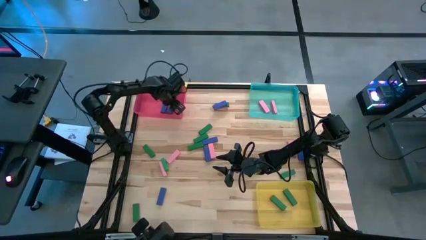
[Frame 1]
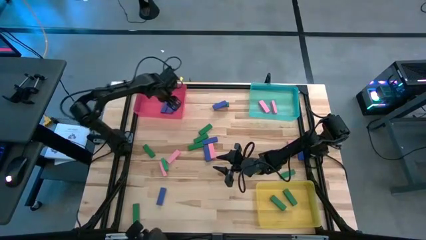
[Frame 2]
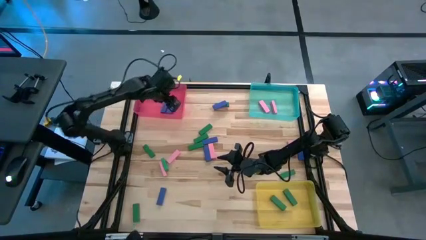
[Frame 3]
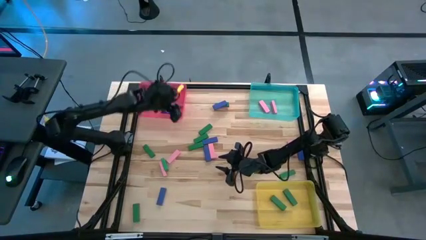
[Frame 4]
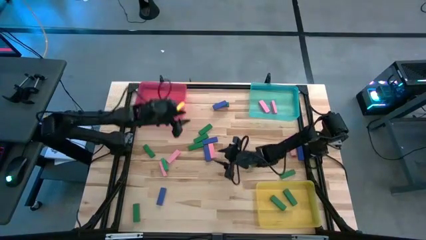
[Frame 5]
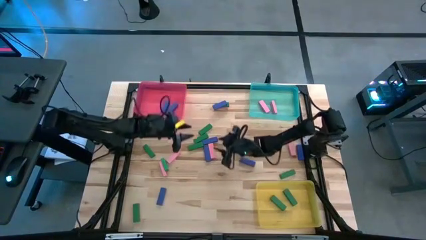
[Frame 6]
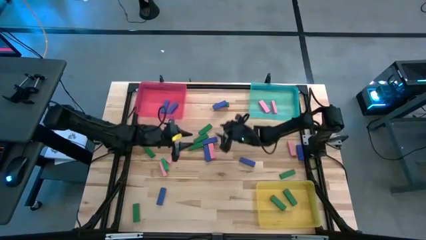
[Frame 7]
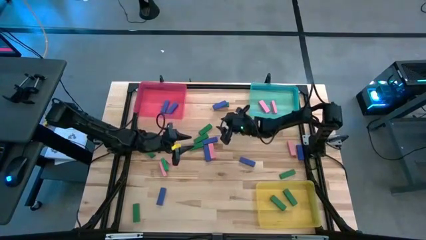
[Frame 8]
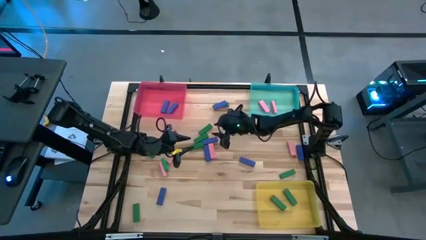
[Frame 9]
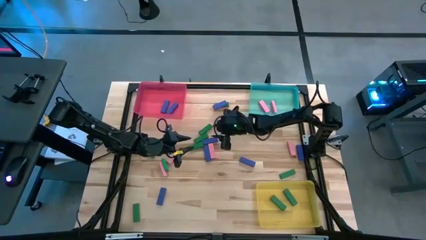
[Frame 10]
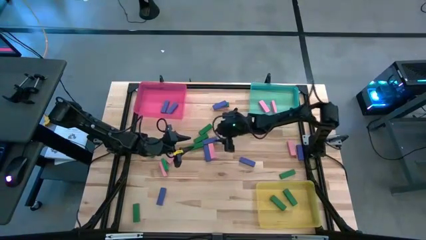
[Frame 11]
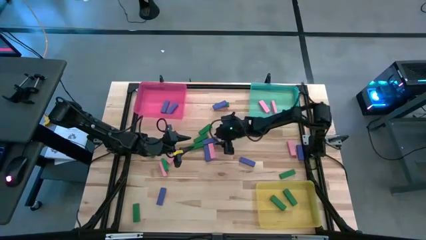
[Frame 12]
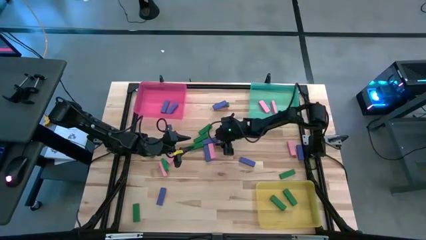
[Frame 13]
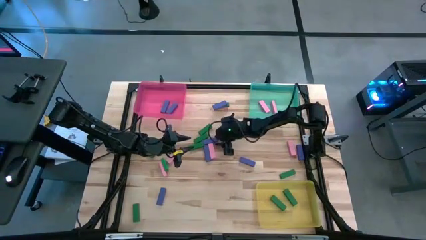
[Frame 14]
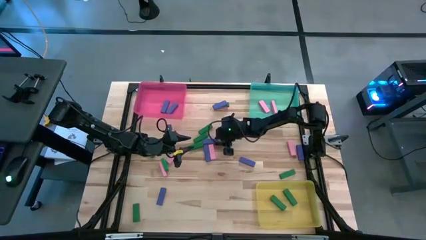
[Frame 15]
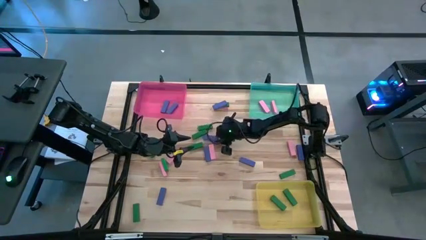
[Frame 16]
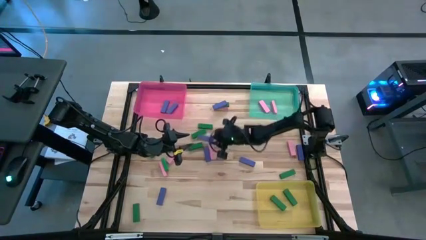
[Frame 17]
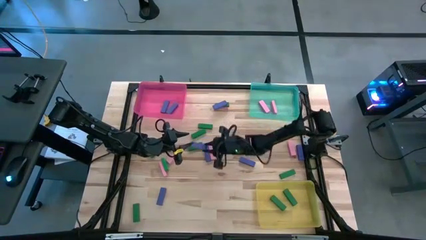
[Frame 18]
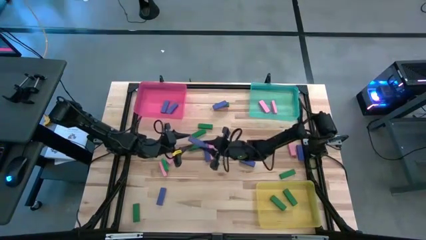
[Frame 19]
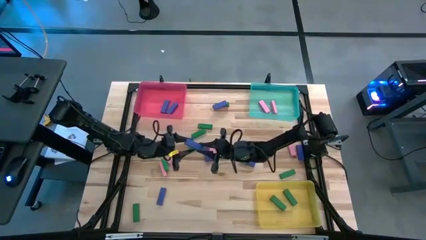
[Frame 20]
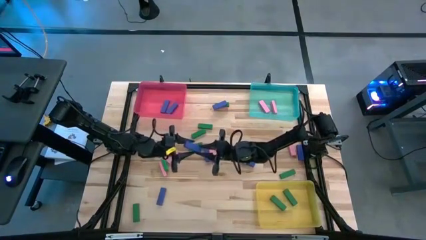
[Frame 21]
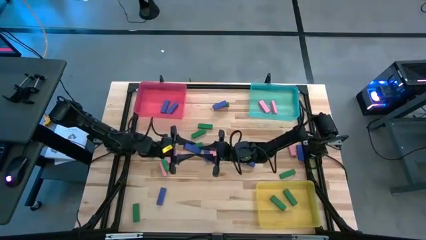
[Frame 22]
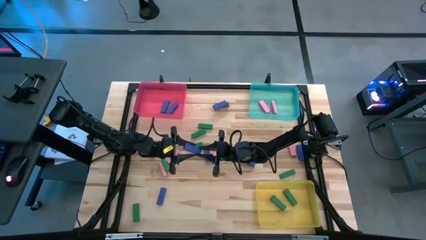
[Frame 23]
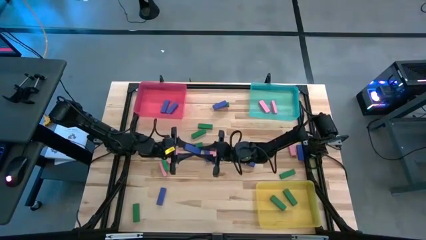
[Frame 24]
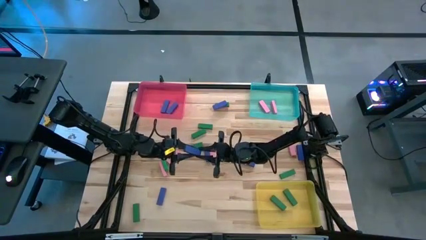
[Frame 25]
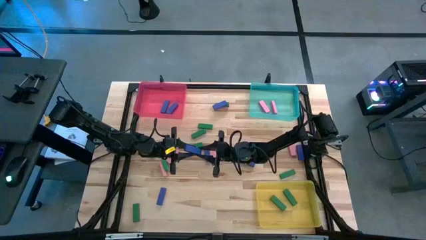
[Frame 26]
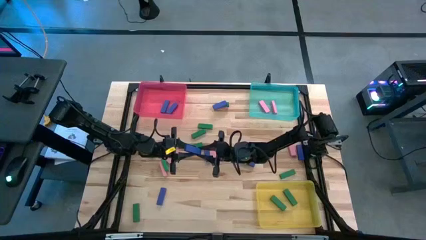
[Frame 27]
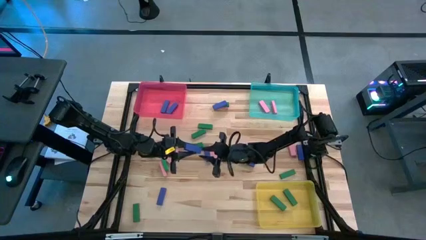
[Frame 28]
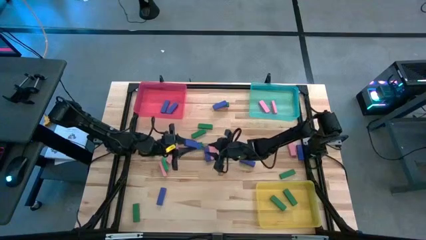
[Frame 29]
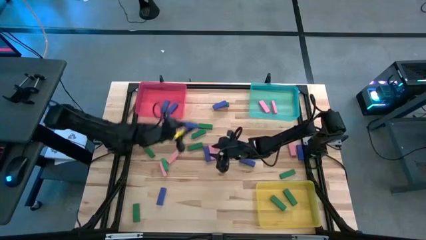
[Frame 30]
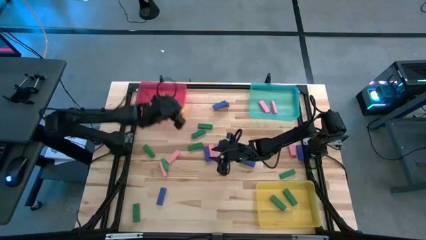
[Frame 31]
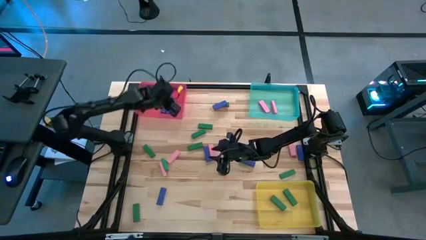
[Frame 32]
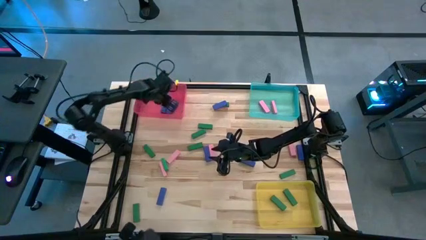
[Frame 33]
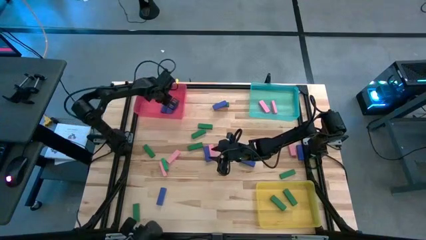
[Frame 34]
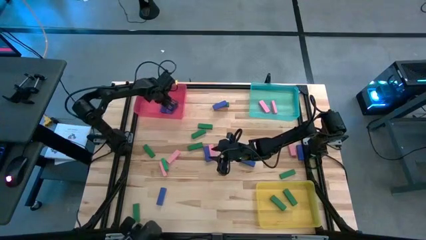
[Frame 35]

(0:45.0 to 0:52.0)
Task: Sort blocks
Put the blue block into the red bin

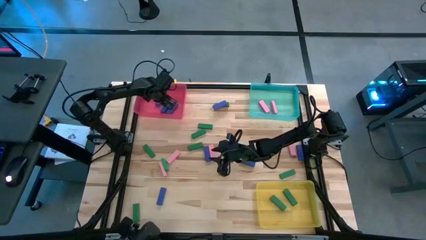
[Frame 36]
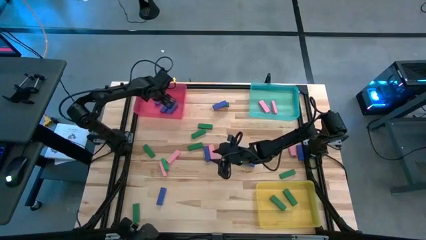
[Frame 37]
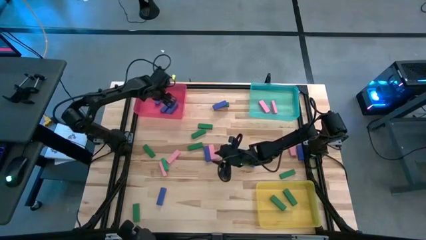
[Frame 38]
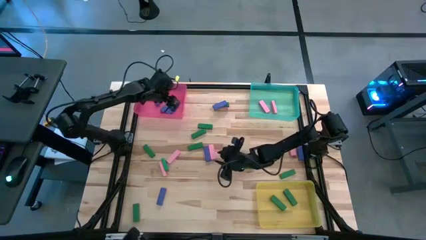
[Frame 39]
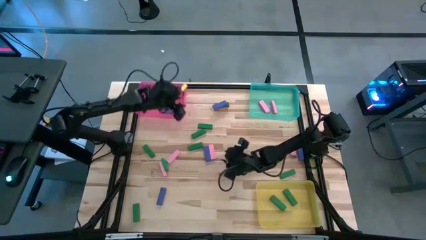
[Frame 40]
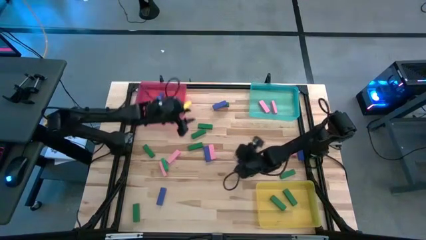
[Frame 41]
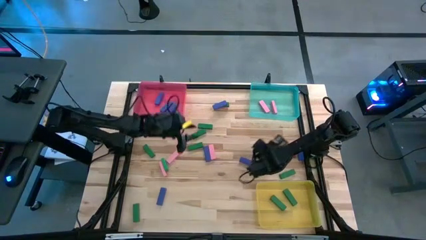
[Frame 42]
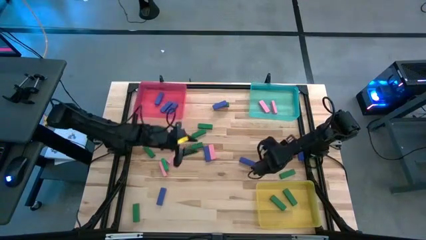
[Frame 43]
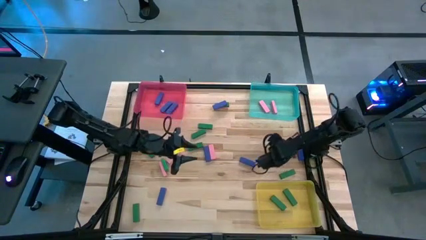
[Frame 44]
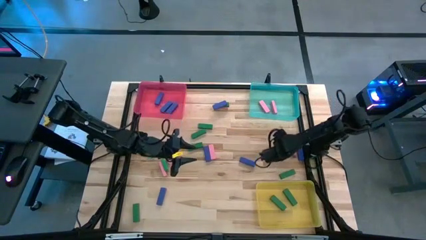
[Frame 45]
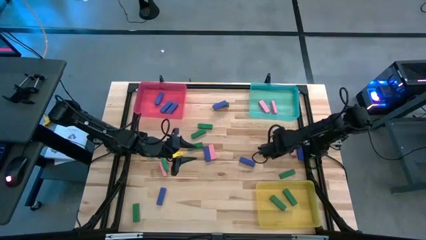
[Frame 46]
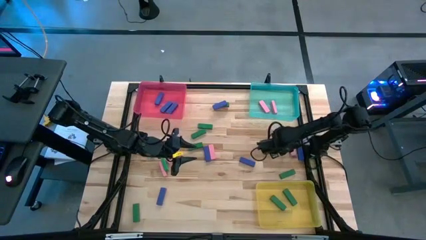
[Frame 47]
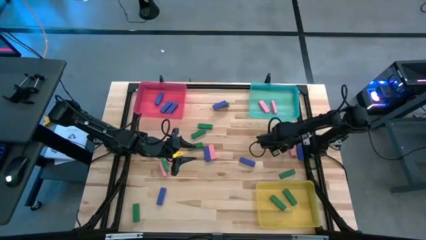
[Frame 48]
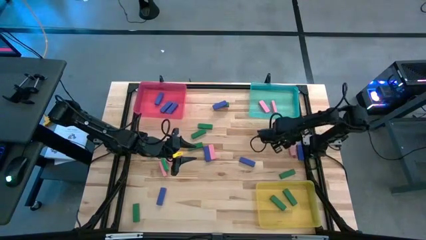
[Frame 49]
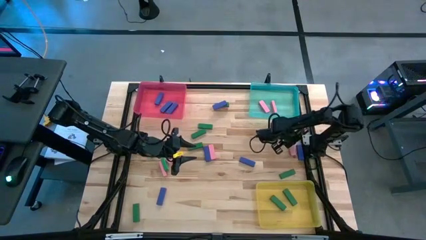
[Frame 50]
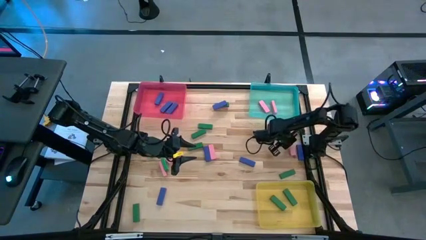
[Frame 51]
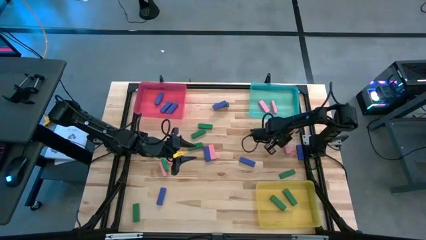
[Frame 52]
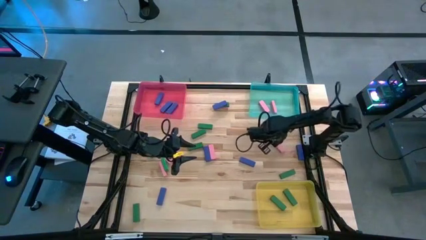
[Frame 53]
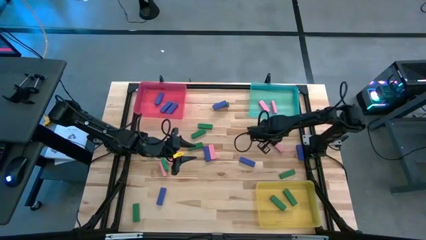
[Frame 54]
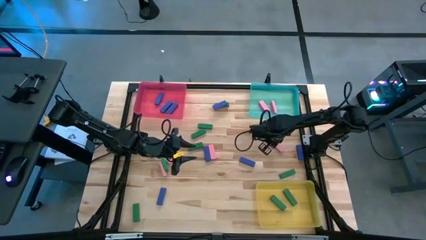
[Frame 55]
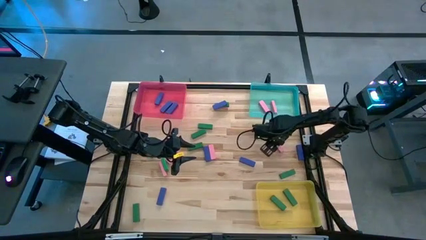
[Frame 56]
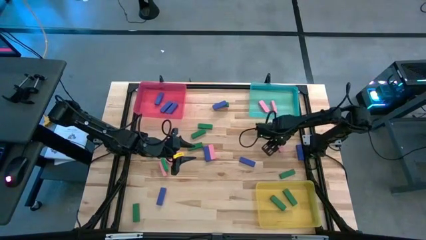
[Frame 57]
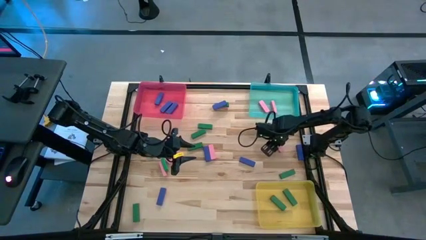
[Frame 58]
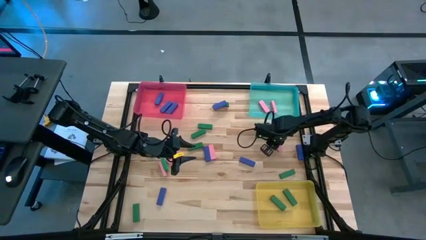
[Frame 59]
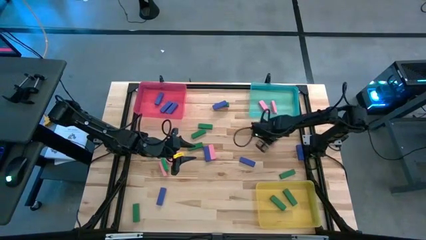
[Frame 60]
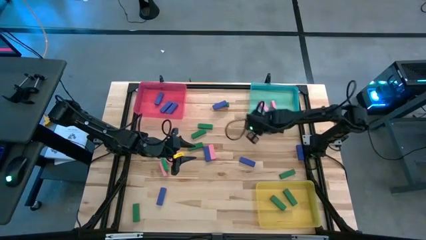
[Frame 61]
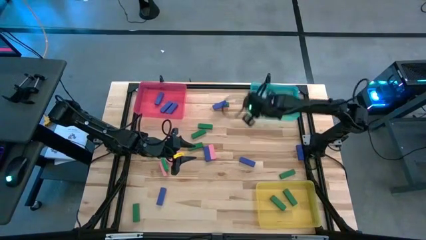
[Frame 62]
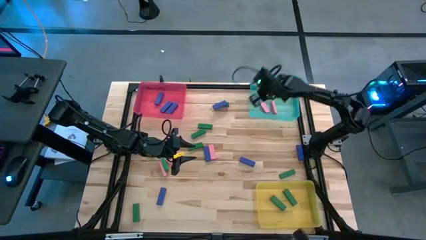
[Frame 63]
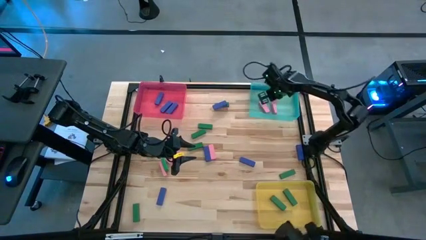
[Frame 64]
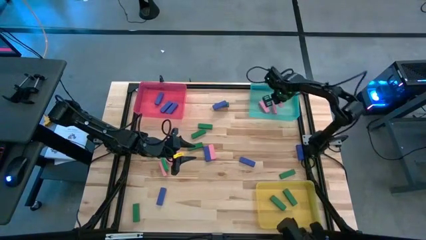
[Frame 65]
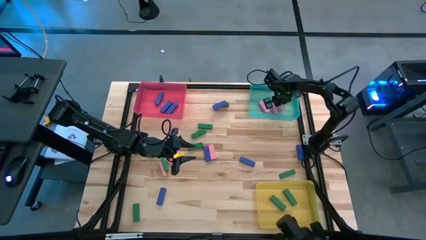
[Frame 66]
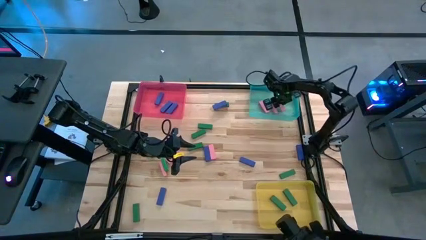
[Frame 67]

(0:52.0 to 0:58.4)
Put the pink block into the blue bin

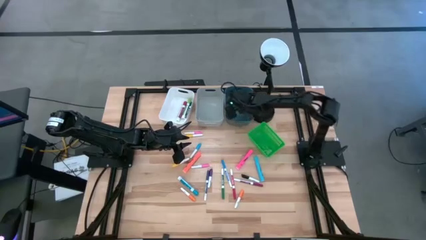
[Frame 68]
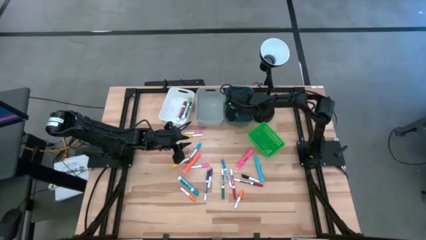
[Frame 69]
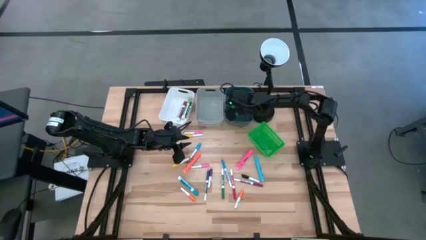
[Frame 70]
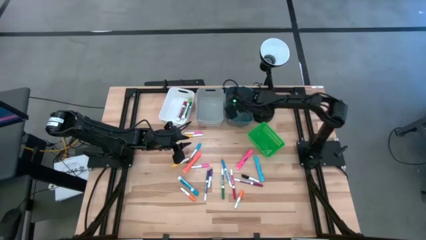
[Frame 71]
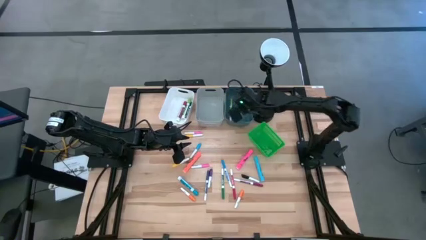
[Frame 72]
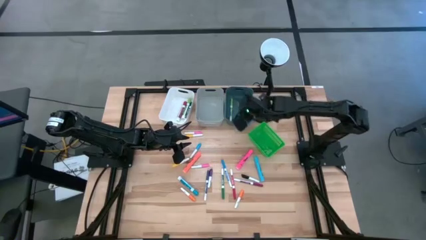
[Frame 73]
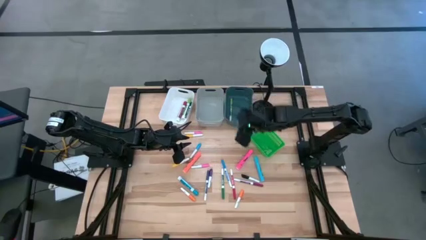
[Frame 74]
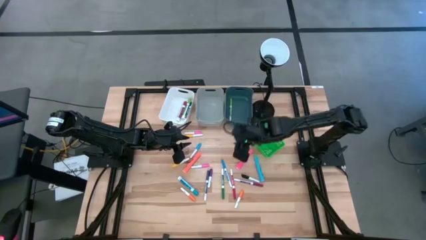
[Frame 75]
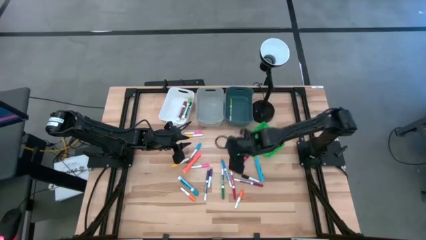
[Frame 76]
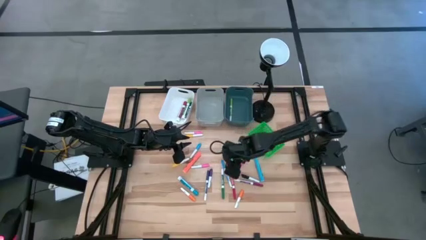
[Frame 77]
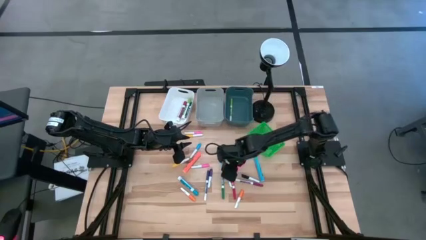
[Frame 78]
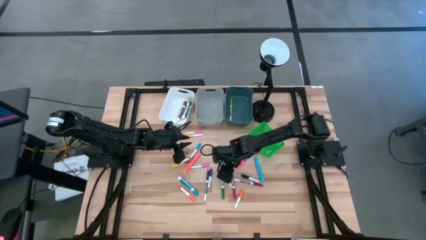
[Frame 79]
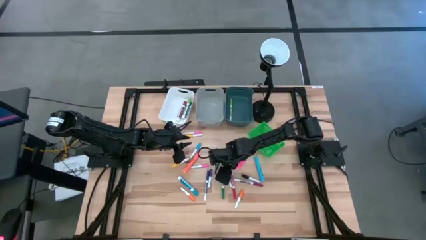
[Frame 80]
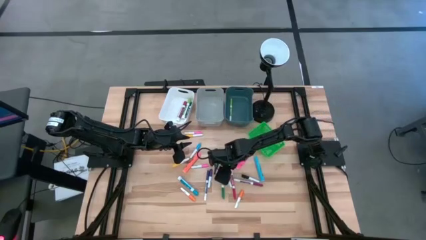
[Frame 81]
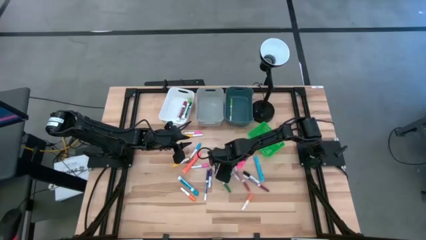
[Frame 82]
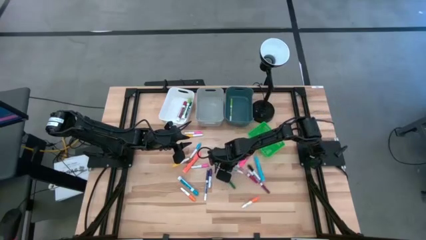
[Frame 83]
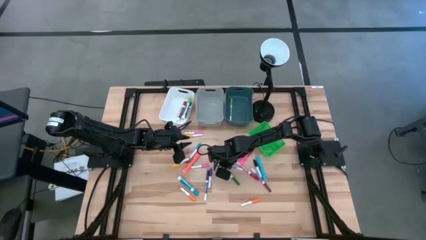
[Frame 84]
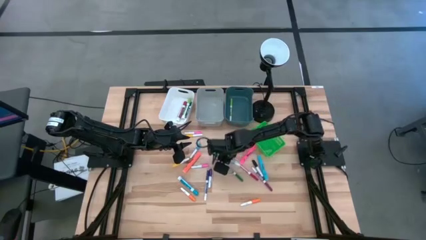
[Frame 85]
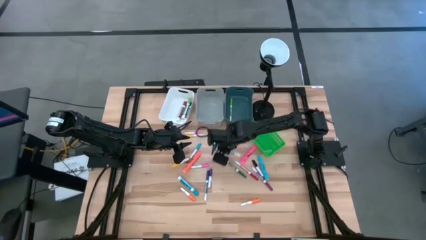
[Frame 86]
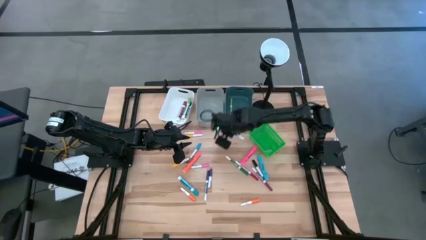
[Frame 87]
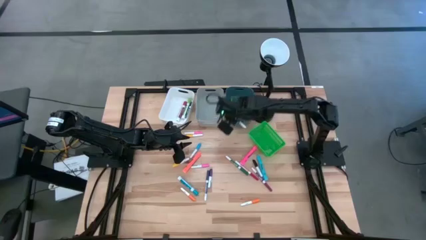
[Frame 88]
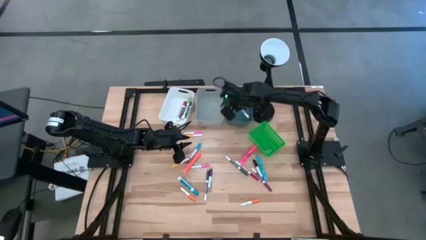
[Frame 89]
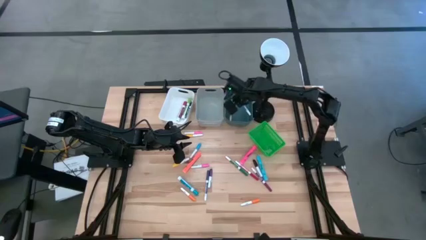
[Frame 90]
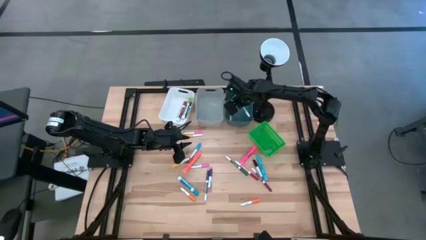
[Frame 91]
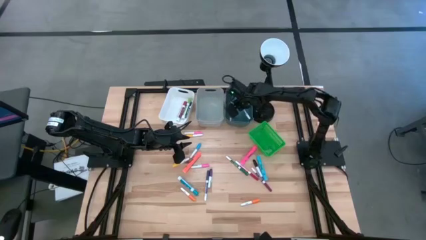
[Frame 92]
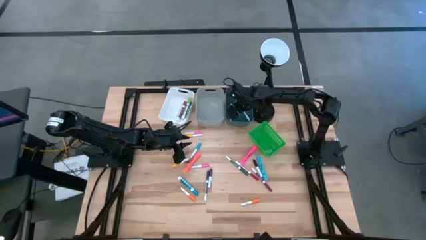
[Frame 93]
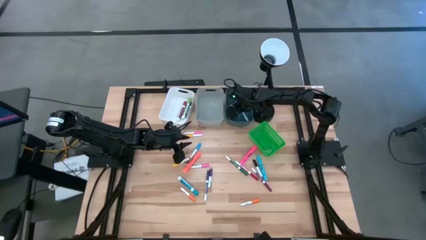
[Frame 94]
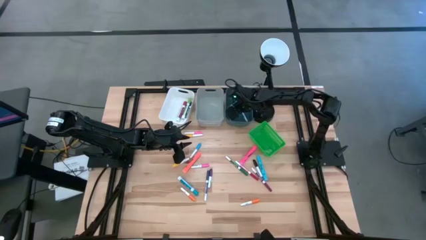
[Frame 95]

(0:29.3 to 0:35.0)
Task: Pick & Place Markers
Put the blue marker pen into the blue bin
